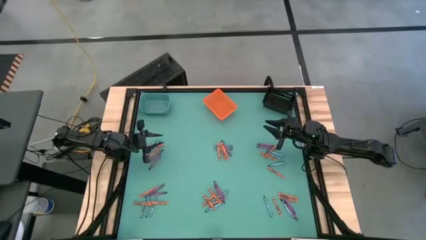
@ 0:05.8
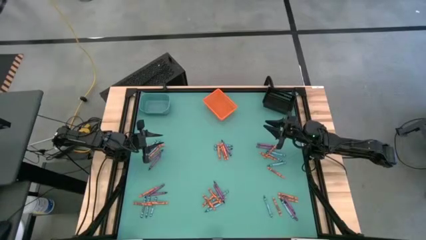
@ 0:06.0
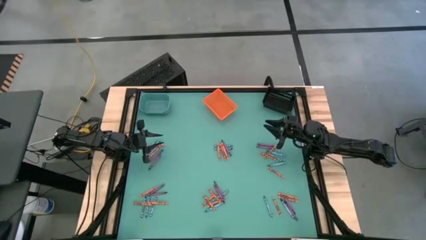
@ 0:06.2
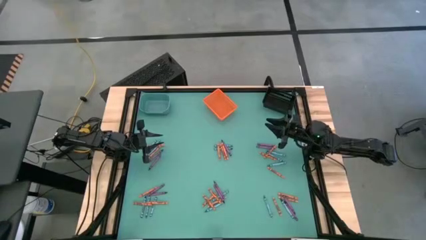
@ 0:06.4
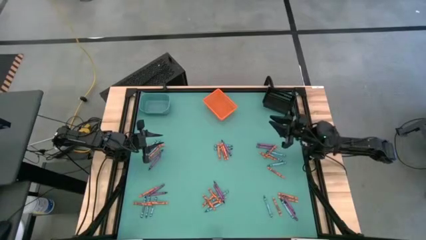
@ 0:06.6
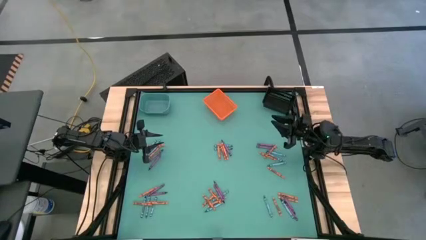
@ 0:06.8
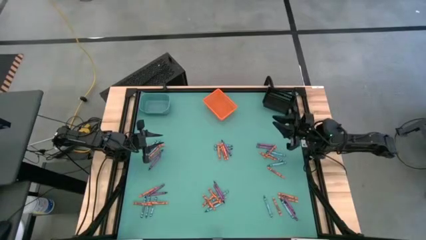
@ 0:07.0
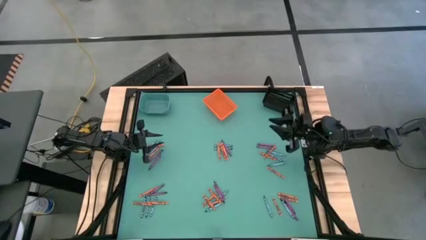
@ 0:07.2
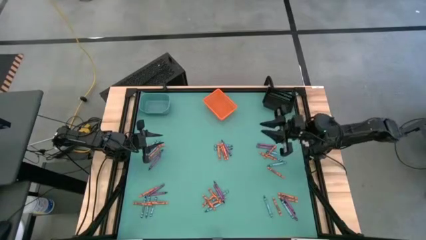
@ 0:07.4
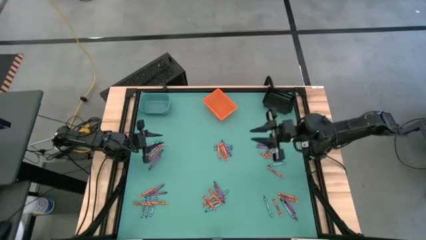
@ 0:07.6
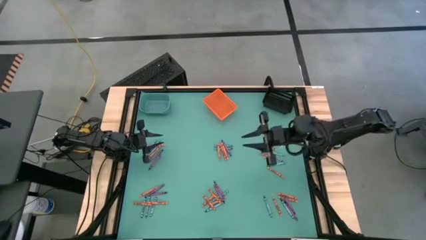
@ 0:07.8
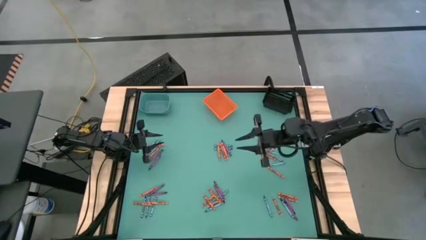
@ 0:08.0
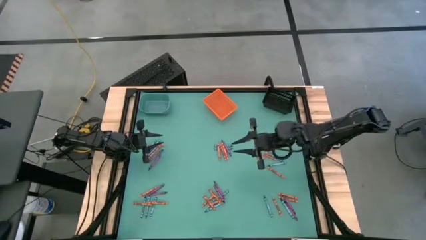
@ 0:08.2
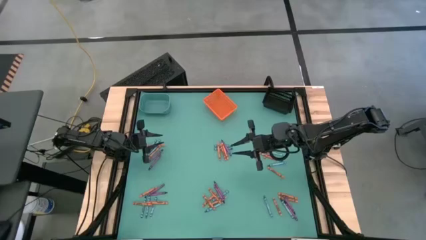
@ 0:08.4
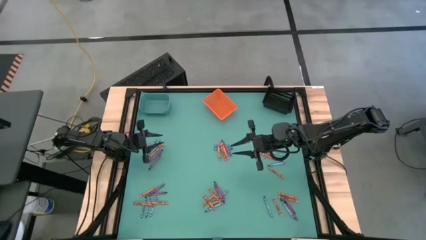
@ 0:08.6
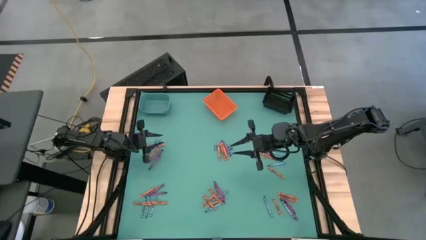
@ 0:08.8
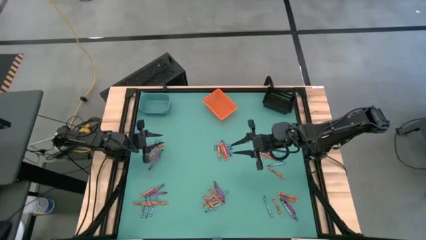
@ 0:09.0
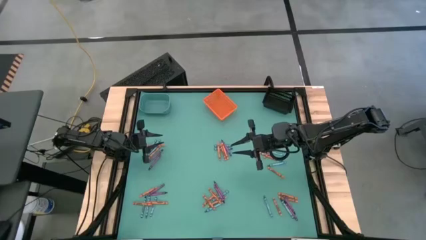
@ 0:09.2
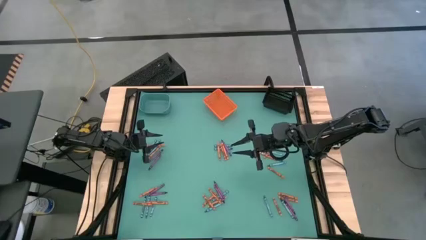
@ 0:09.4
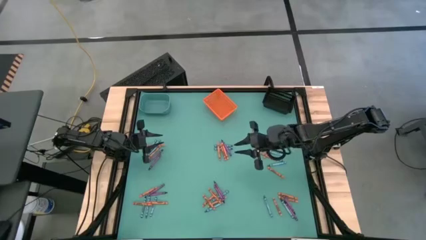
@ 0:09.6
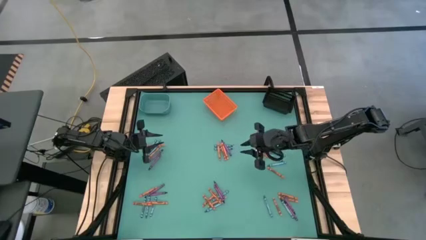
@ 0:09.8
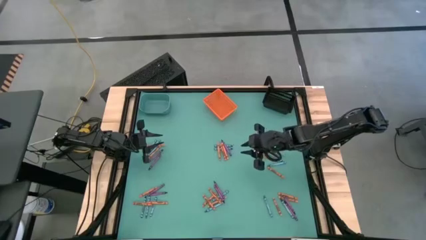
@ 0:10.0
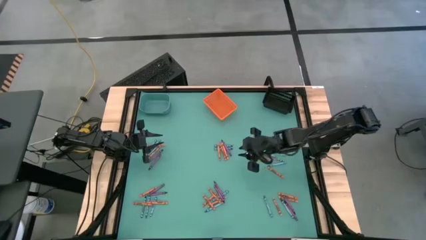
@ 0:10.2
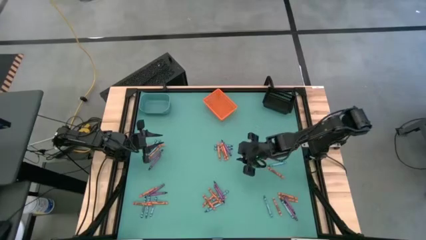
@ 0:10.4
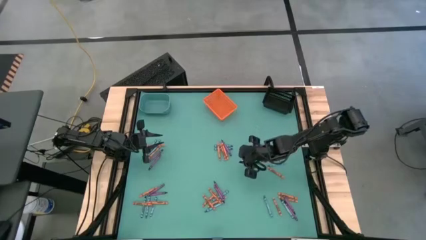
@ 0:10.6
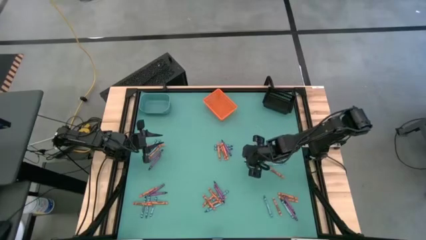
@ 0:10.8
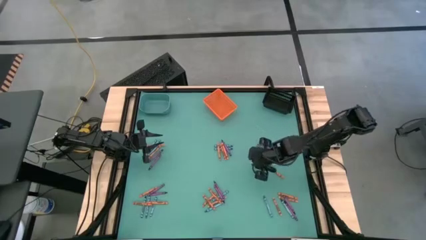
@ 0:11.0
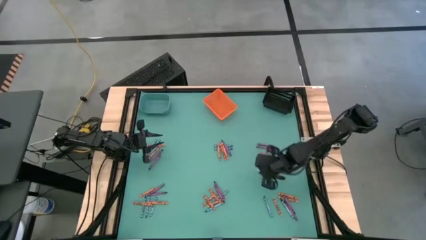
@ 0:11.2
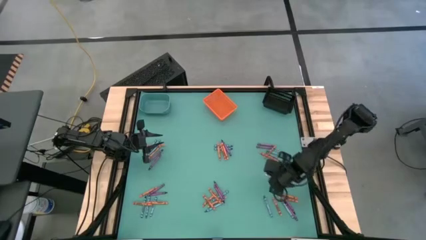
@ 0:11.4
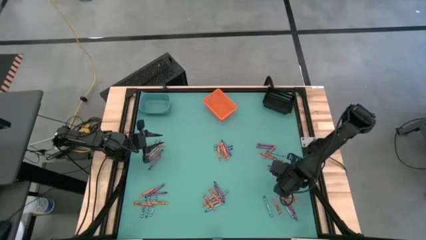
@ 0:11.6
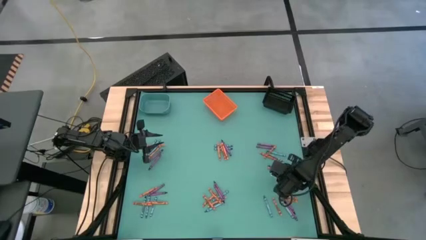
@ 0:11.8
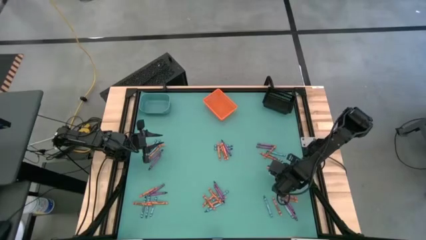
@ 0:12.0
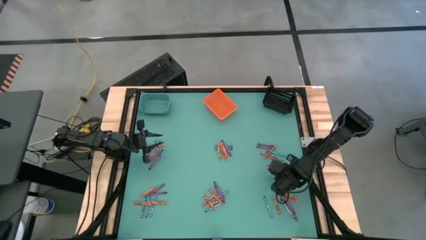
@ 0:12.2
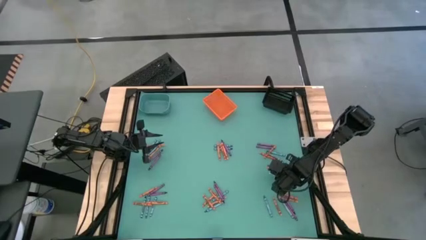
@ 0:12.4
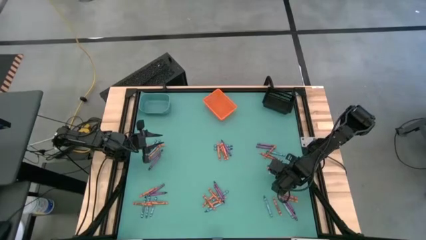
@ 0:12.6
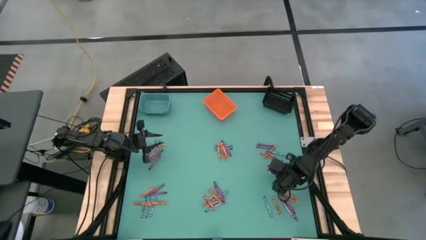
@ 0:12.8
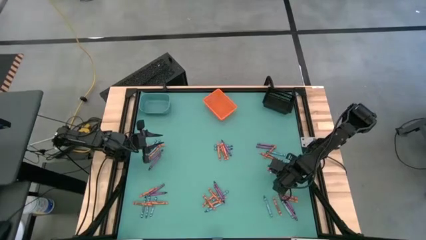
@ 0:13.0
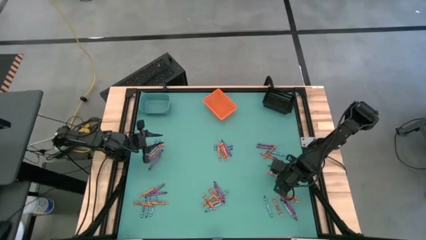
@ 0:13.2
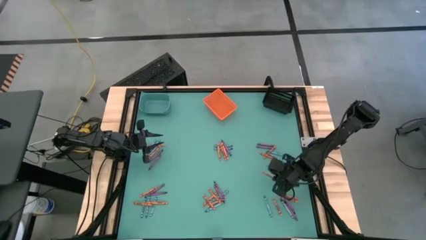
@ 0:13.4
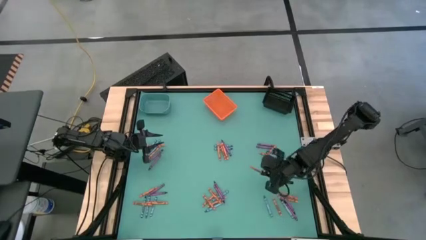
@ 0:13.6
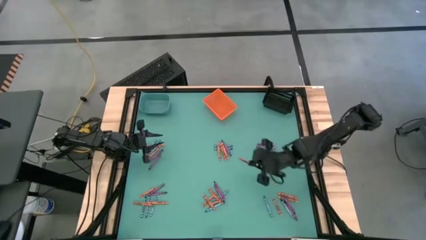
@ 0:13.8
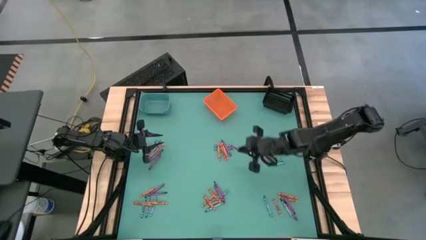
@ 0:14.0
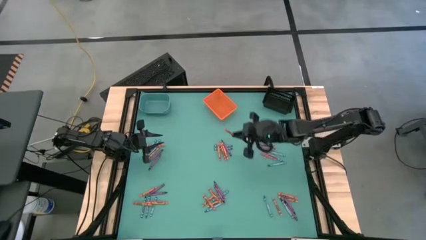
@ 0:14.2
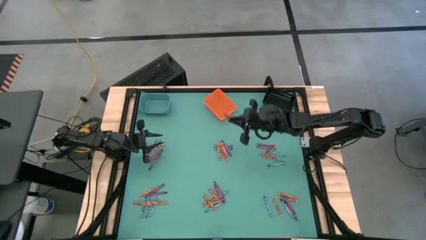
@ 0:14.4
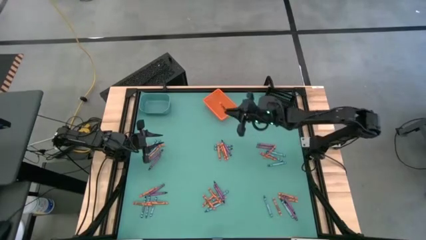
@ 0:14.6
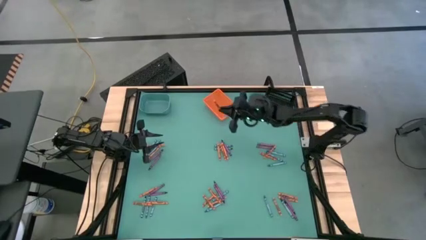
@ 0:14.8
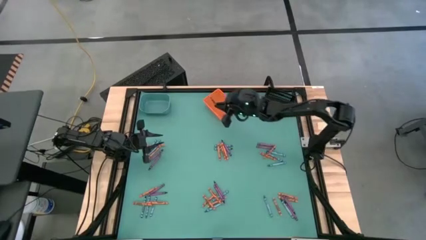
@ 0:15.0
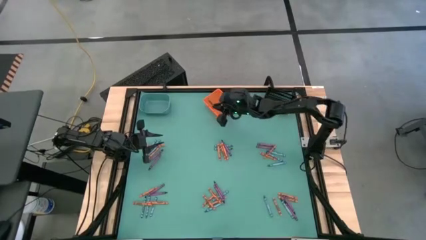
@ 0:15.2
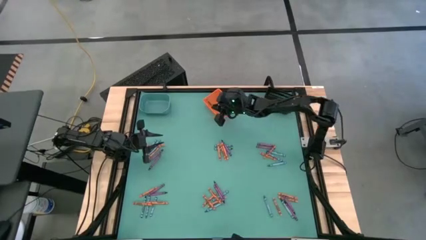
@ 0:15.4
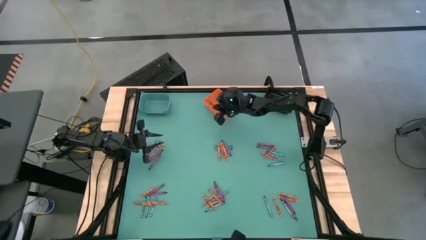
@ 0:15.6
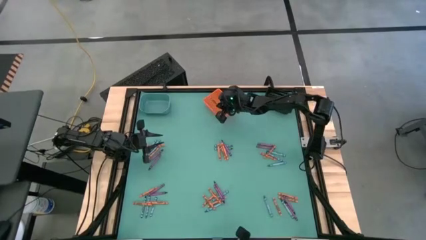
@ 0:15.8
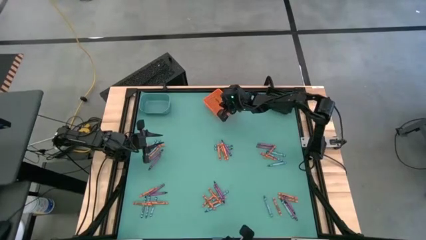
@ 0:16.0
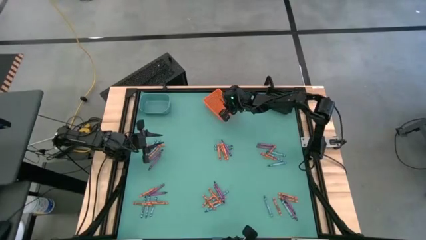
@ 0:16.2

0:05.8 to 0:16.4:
Task: Sort crayons
Put the orange crayon into the orange bin

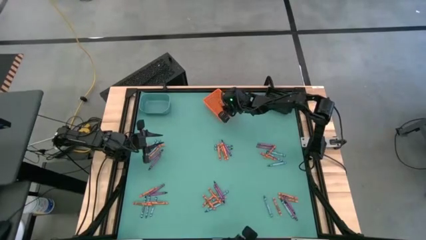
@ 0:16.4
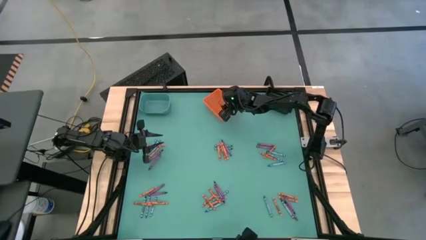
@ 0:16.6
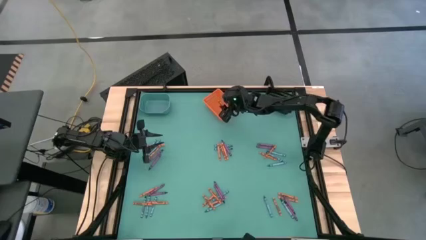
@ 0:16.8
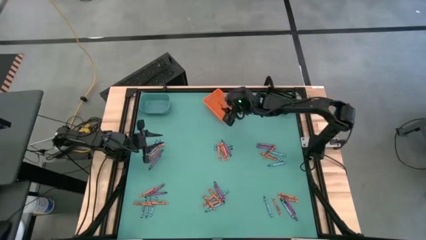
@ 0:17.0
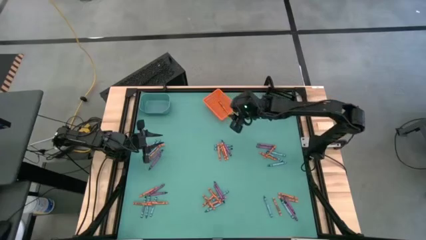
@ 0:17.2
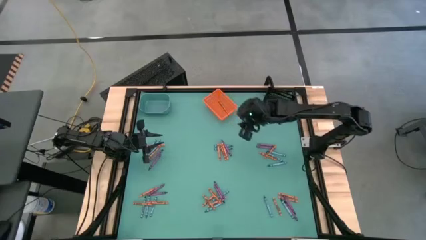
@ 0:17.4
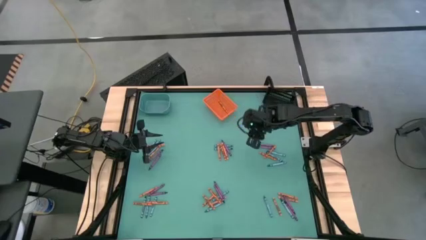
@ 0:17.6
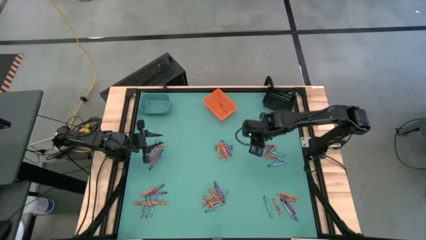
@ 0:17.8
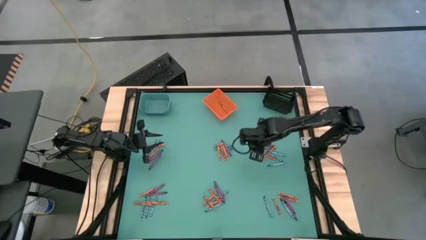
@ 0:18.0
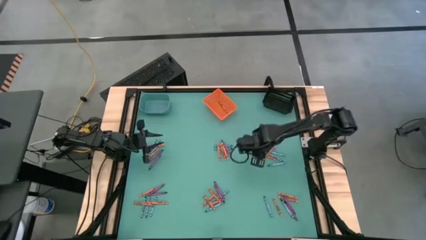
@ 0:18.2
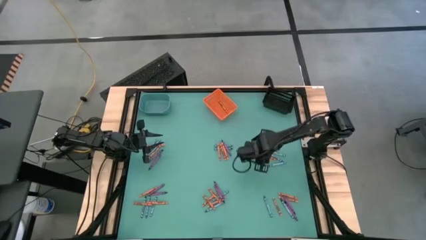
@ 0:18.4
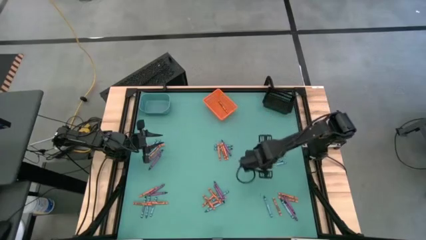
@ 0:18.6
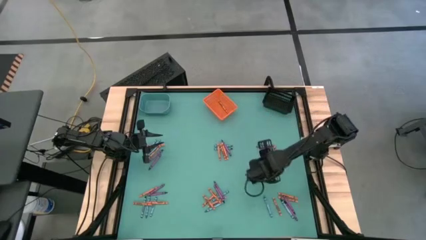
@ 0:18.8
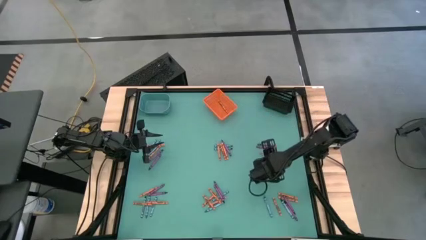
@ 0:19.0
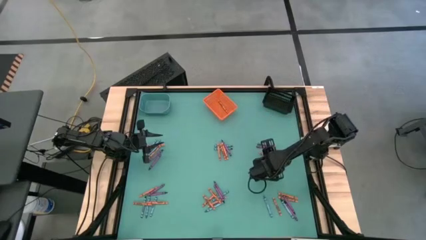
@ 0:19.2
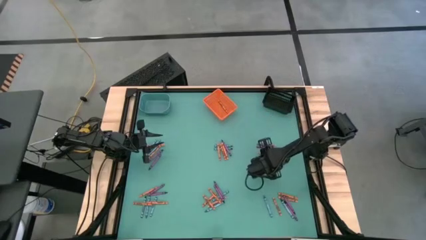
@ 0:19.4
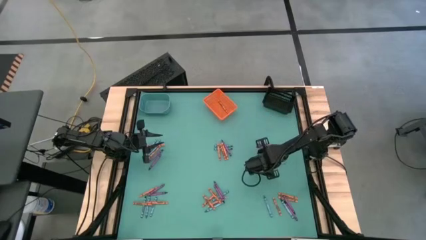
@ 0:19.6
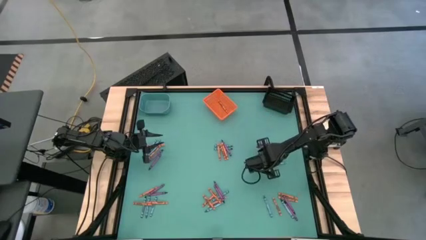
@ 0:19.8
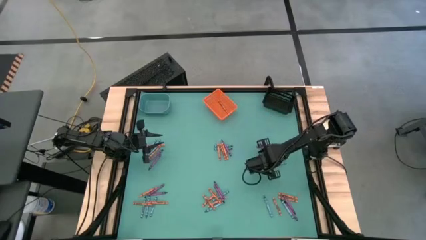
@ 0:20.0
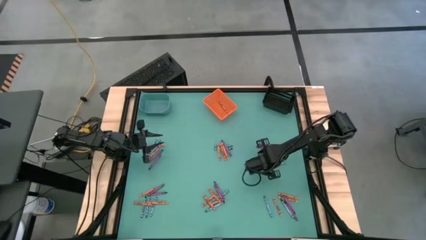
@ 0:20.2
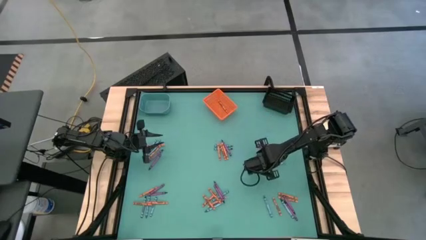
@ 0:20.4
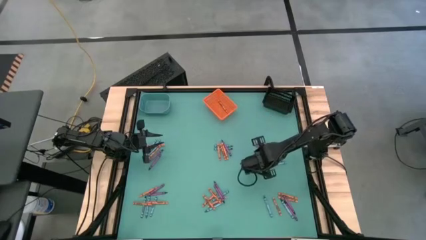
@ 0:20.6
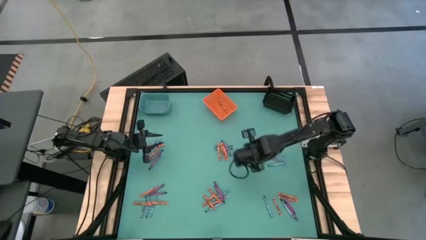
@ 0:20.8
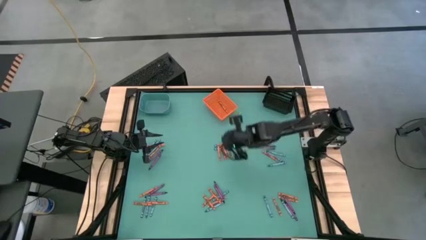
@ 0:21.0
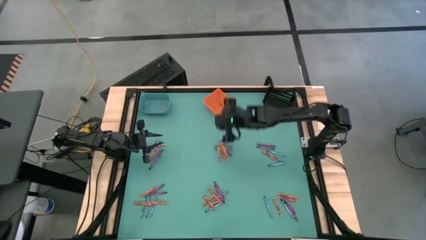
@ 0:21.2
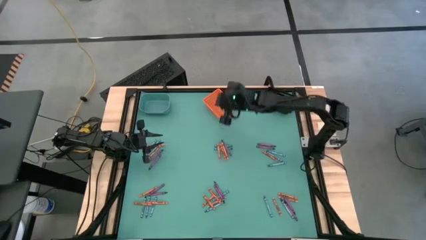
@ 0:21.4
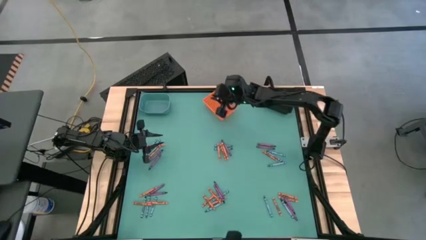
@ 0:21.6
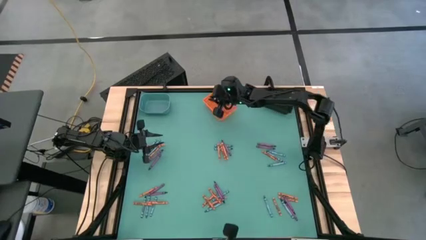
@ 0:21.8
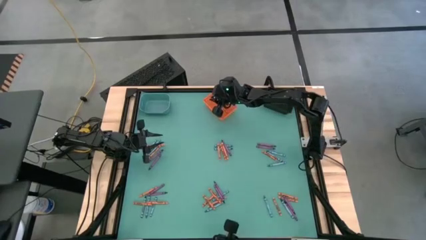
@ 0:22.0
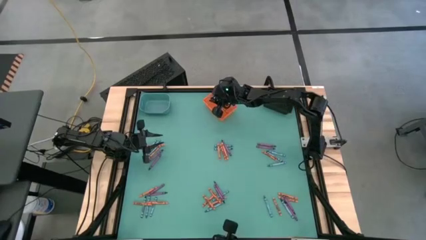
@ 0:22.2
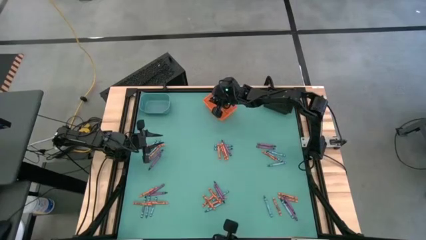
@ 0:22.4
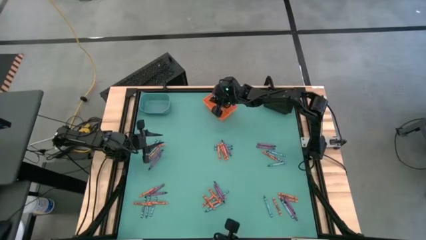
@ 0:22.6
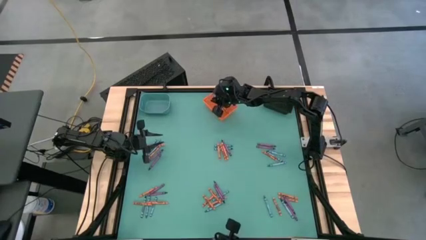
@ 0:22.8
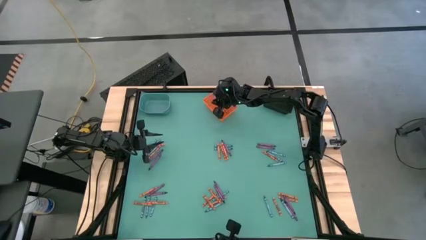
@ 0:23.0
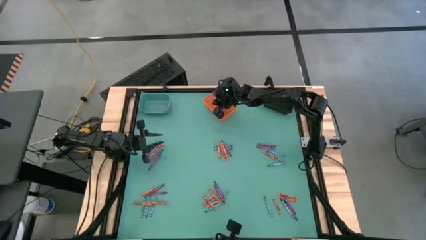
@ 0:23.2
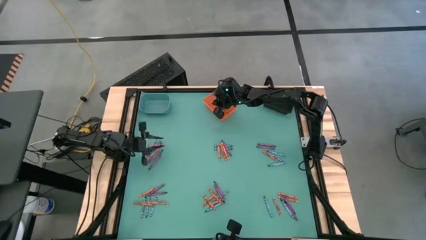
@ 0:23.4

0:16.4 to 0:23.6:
Put the orange crayon into the orange bin
